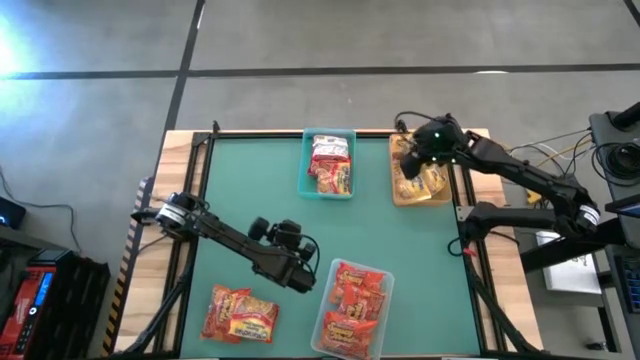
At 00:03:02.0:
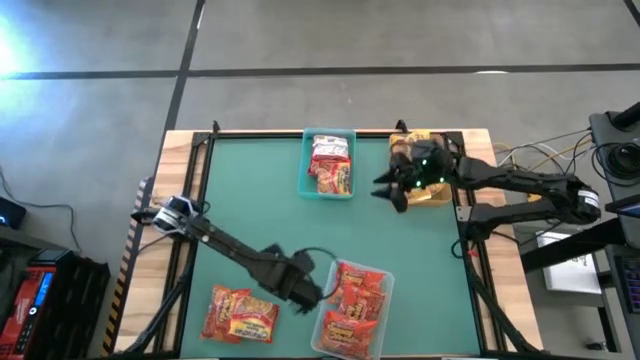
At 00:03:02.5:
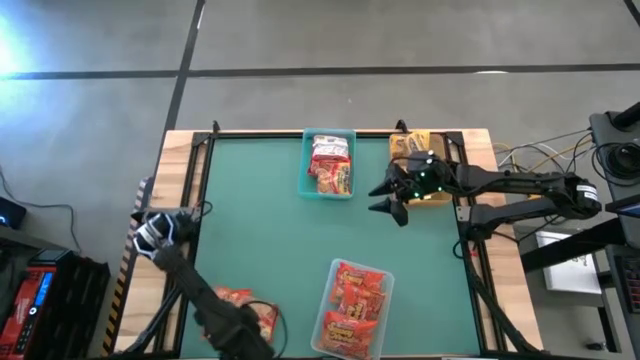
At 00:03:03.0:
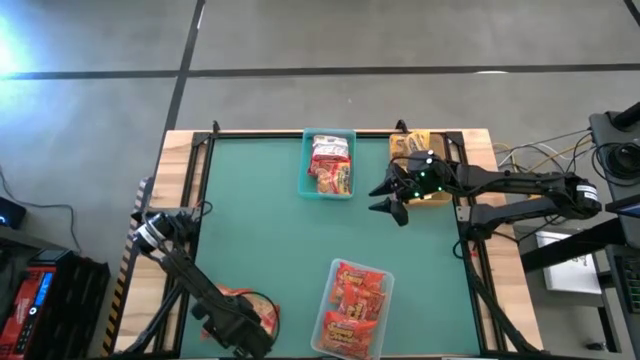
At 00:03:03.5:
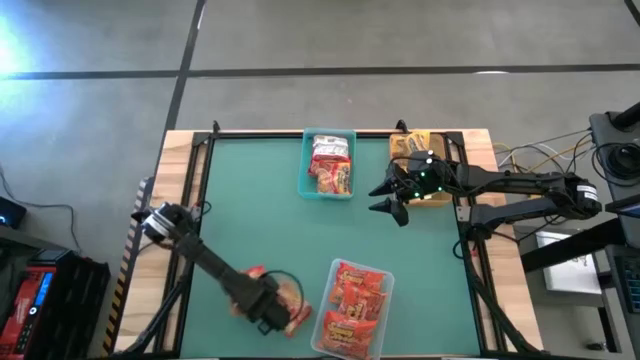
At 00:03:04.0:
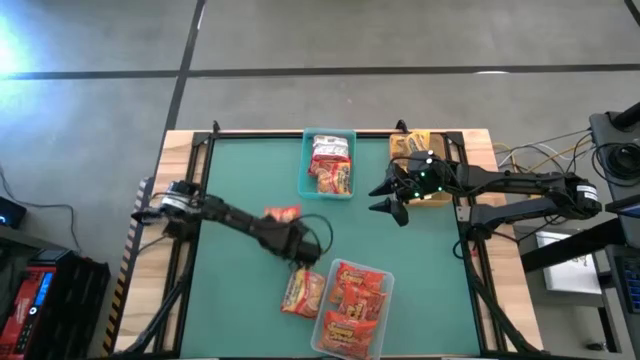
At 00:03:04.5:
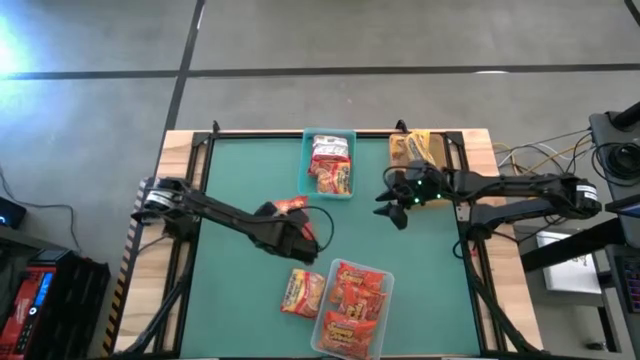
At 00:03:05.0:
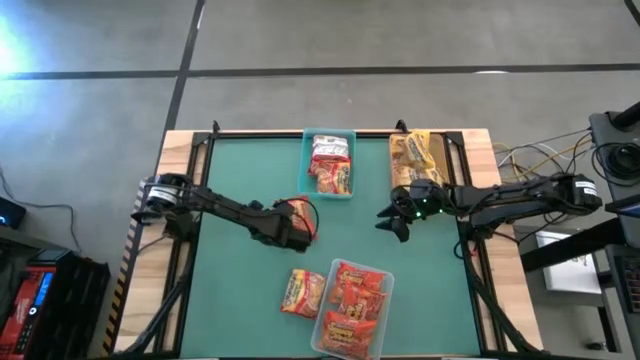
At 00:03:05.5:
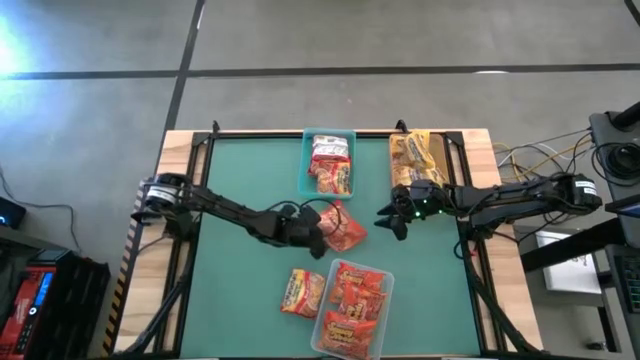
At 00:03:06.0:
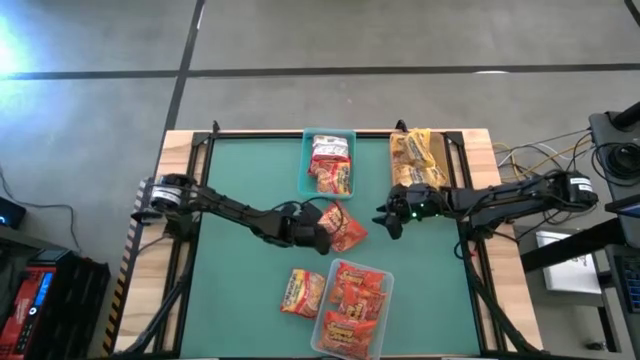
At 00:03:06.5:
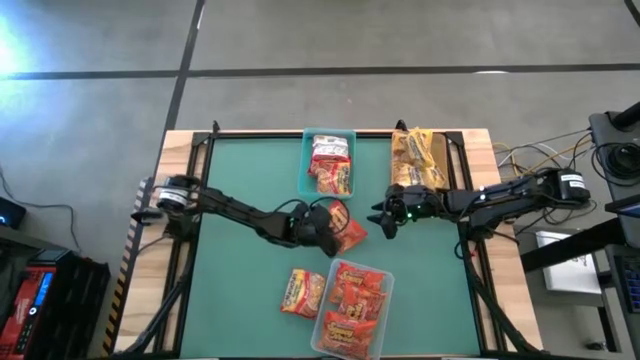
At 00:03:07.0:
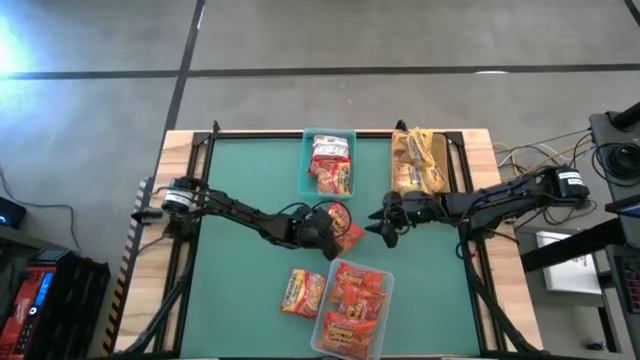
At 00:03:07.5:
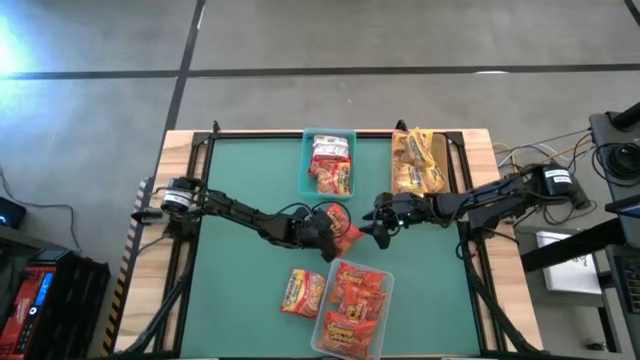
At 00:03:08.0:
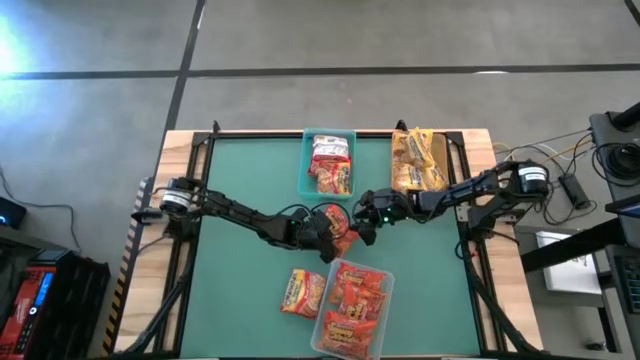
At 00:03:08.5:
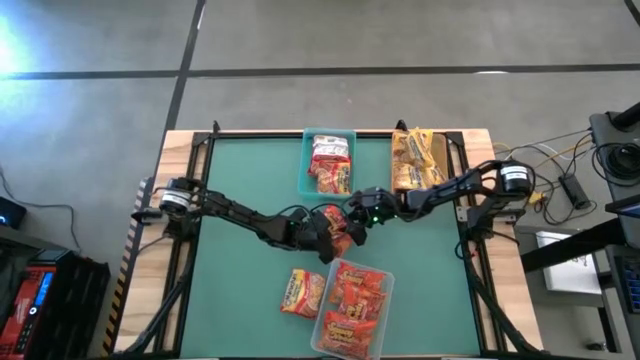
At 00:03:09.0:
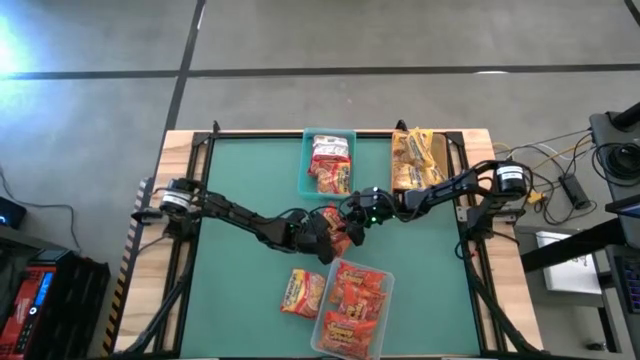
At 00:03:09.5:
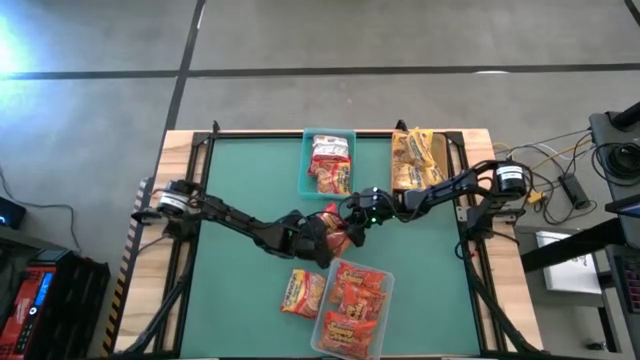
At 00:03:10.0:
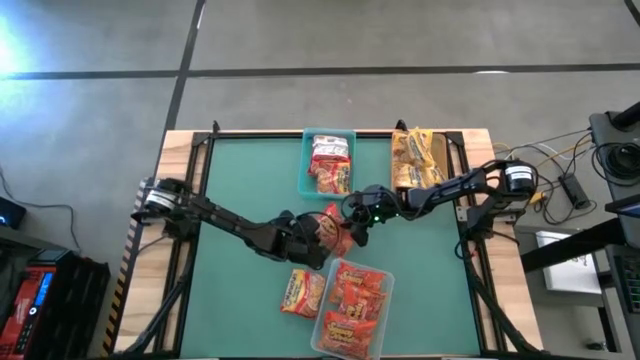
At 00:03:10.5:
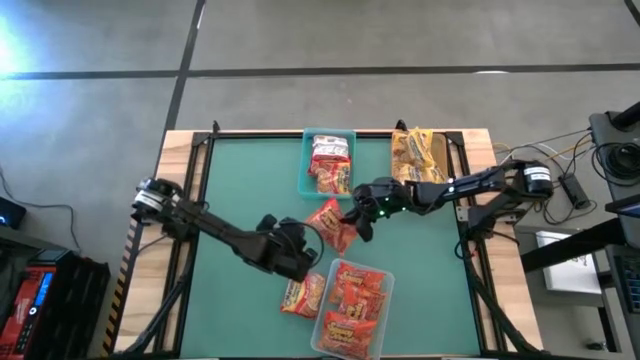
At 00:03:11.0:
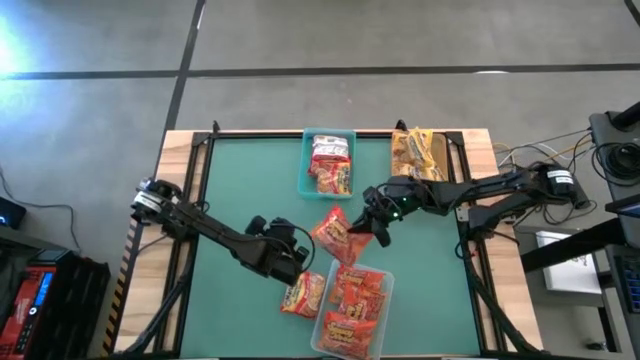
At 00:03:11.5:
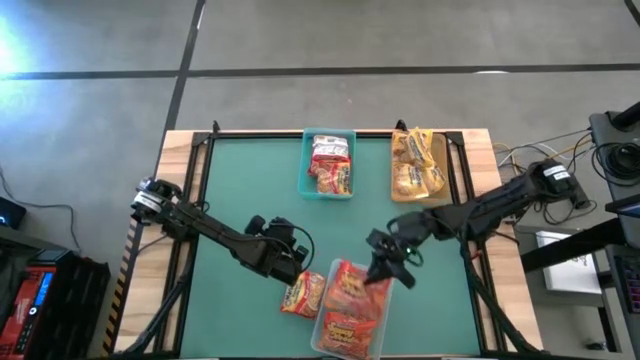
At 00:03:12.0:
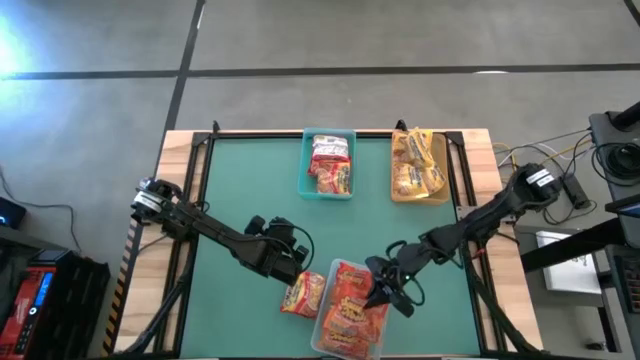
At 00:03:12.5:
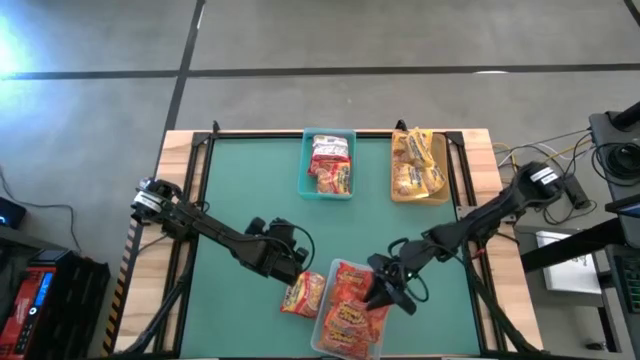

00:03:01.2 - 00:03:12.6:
Task: Sort Maruchan noodles
Put the orange noodle pack into the transparent bin

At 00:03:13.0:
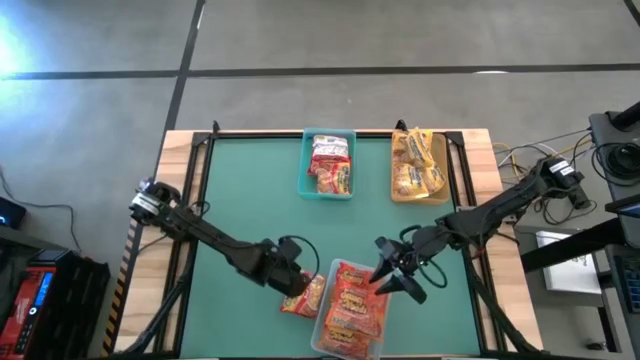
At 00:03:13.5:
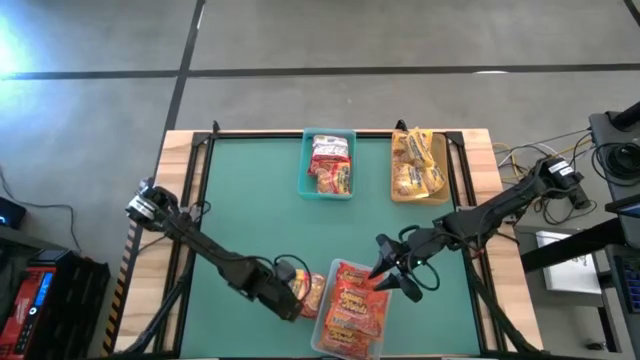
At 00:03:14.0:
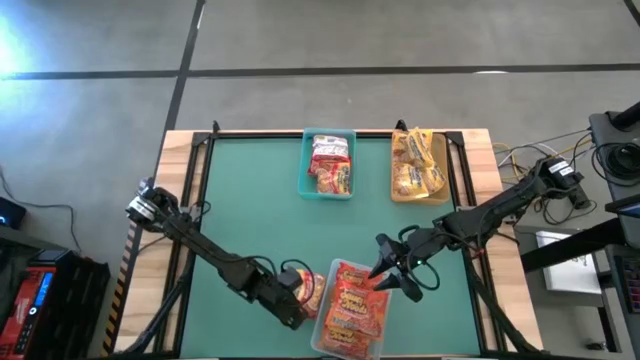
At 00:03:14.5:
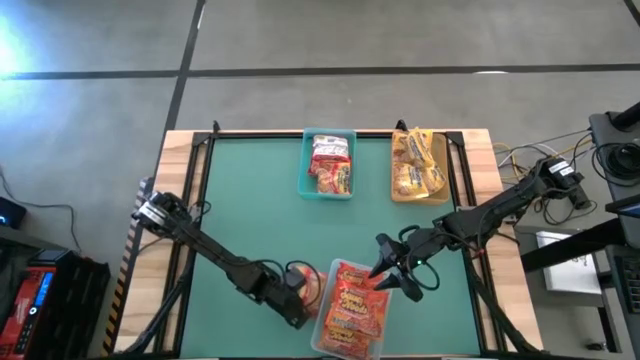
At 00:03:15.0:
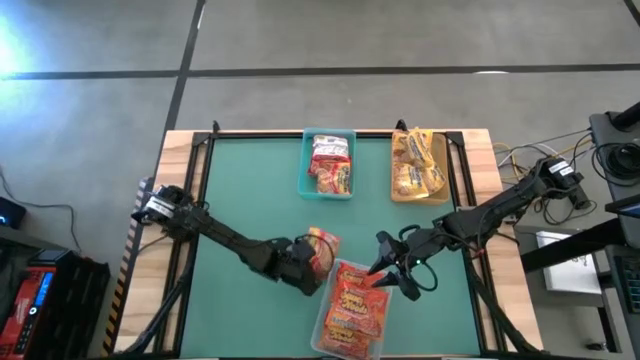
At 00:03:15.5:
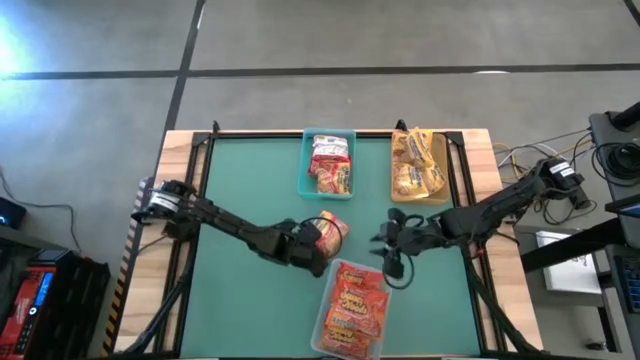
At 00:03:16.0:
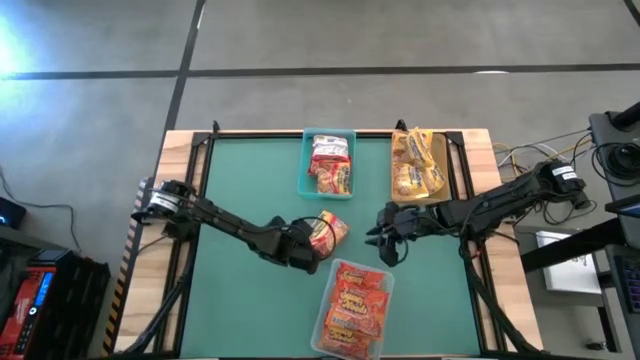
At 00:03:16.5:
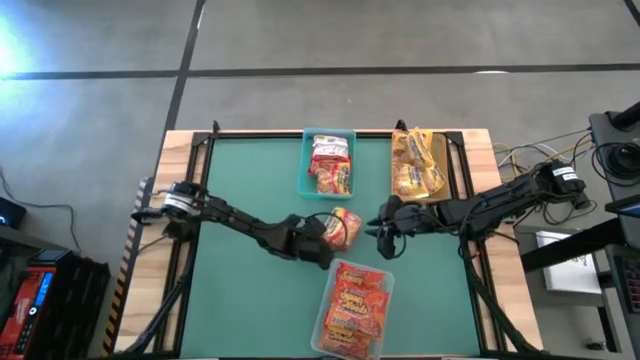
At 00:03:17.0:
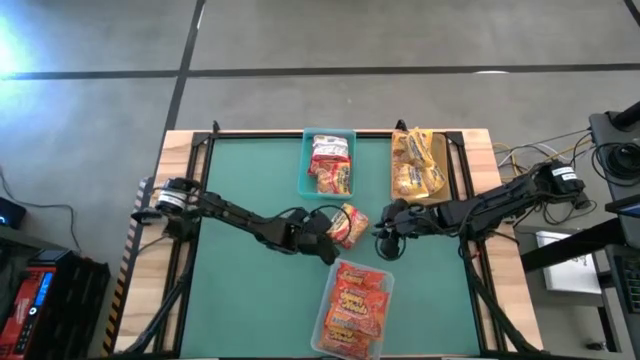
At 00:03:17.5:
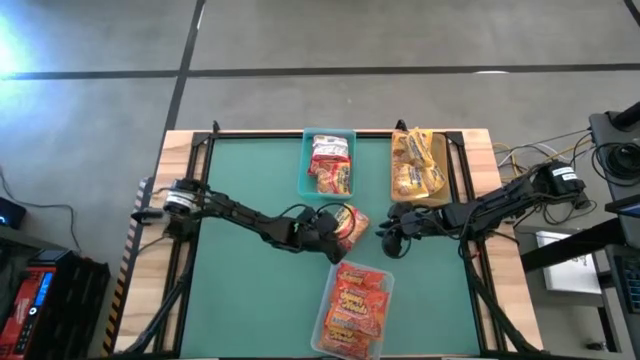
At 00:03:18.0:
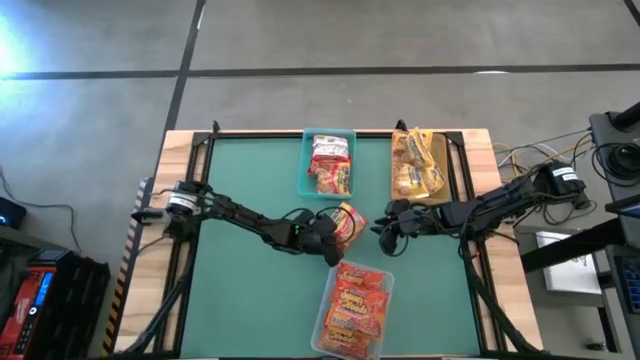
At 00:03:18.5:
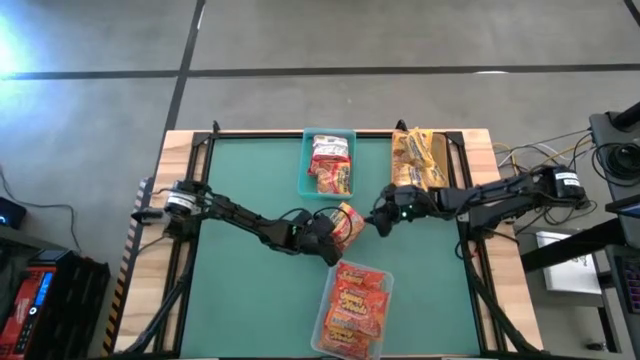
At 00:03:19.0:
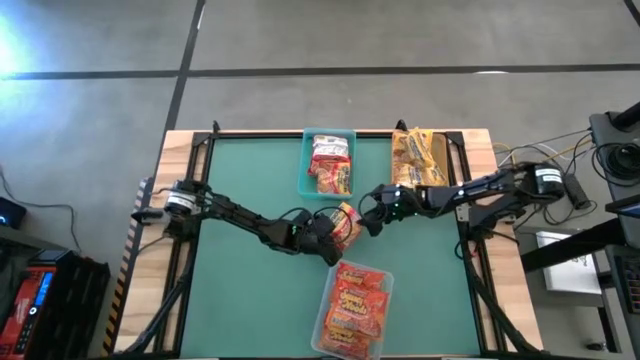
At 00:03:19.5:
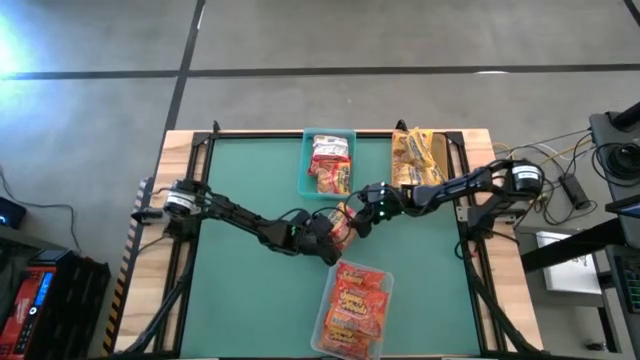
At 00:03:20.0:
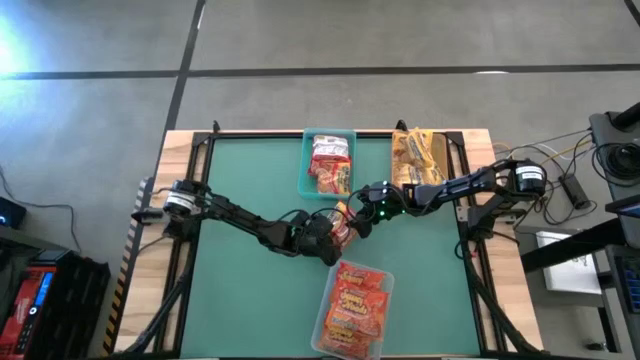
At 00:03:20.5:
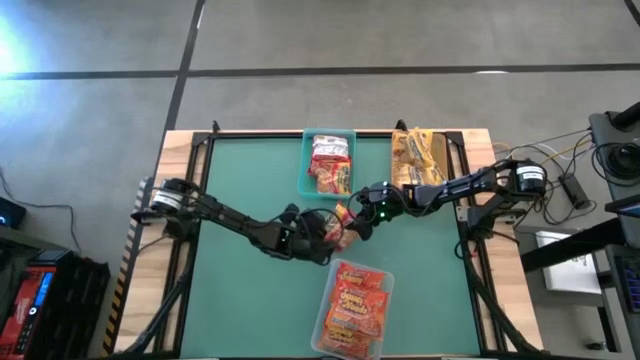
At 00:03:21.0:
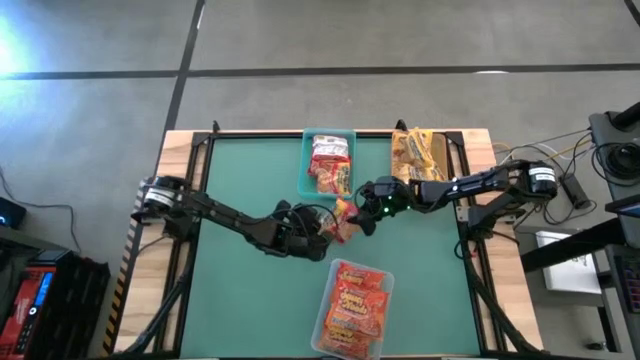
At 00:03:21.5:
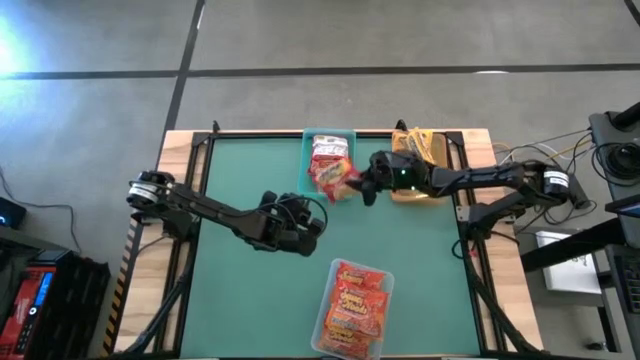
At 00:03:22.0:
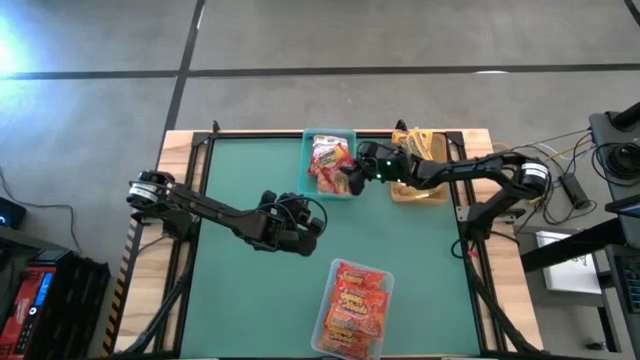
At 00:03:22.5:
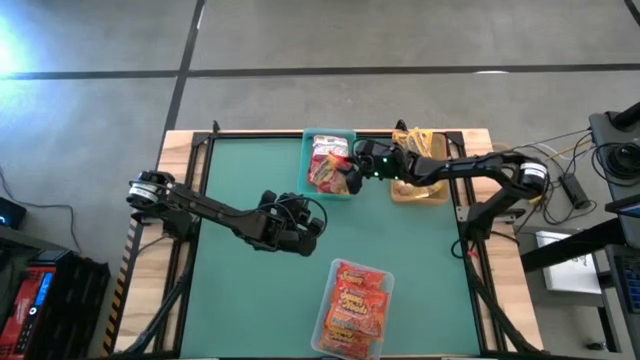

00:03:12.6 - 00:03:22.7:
Put the red noodle pack into the transparent green bin
